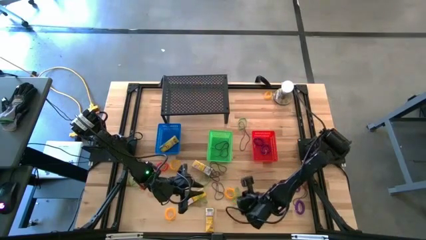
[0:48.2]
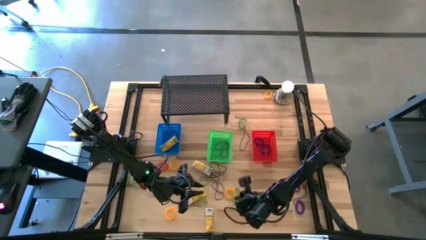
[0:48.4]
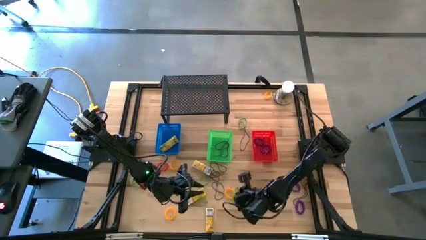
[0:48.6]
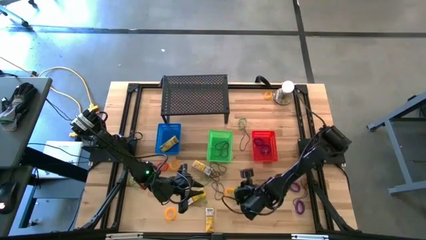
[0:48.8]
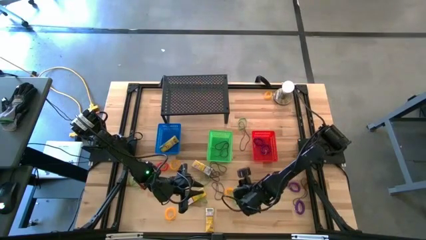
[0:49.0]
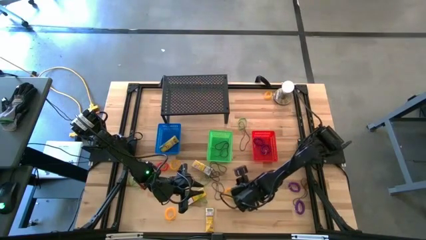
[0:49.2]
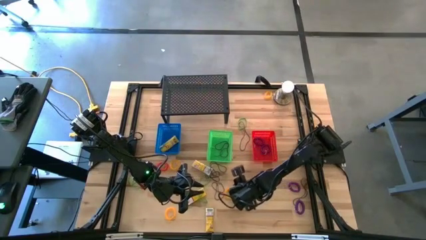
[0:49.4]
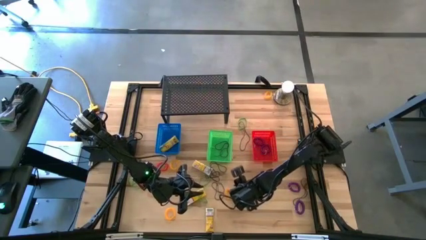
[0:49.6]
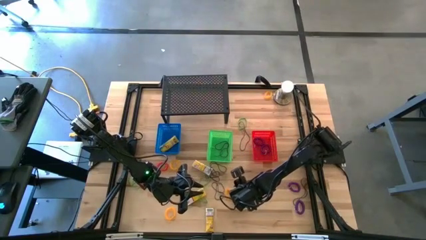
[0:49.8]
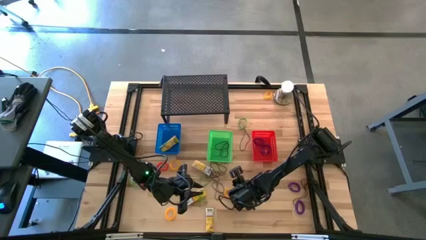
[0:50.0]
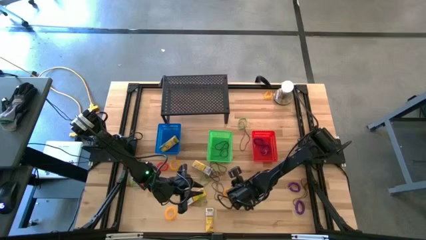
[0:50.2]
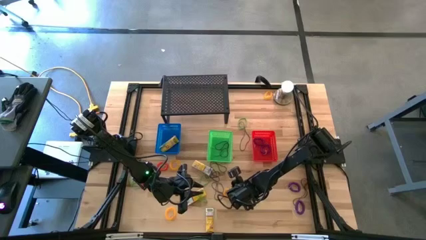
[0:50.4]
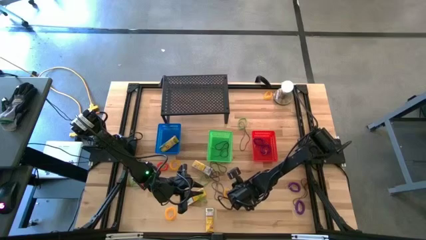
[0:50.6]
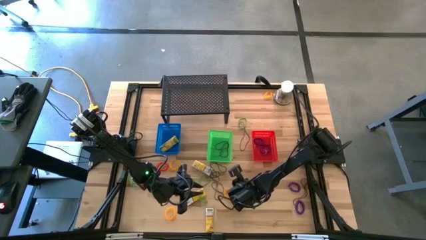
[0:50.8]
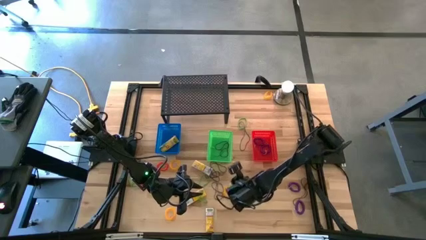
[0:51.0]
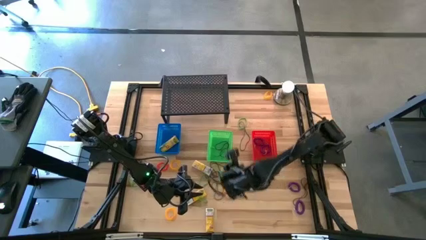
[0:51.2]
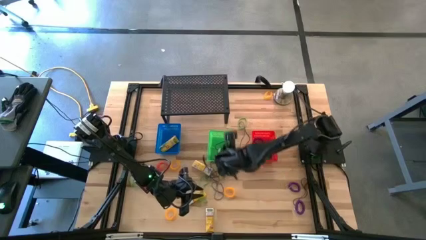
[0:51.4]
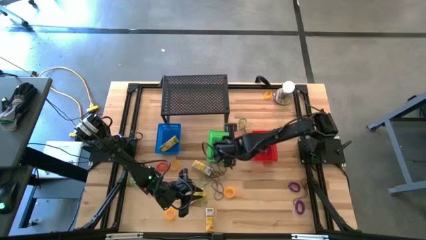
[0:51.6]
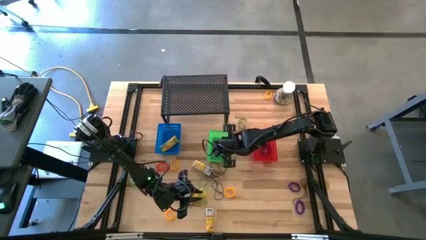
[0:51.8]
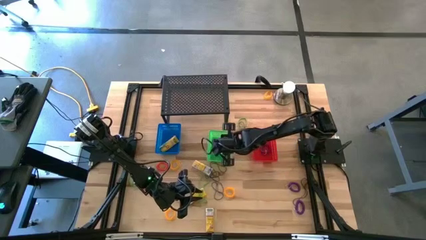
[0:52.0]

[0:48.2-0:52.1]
Task: Pick & Place Office Desk Supplies
Put the green rubber band into the green bin

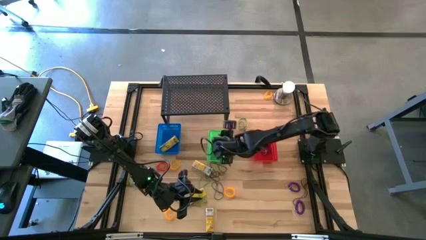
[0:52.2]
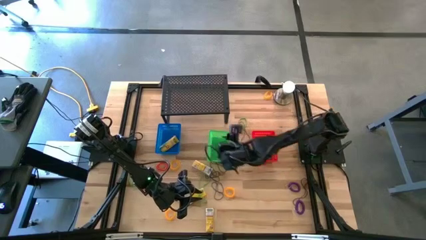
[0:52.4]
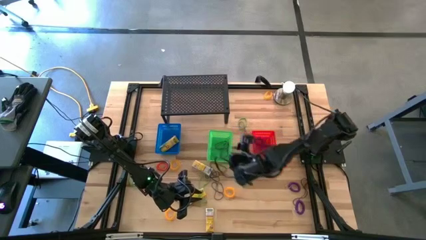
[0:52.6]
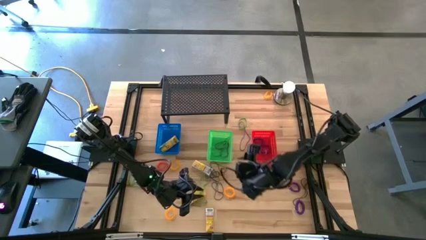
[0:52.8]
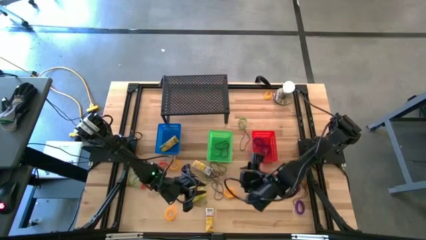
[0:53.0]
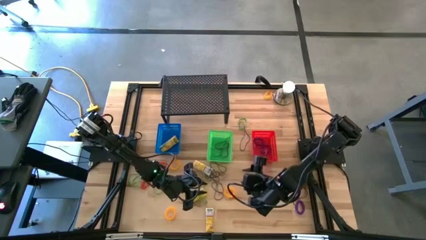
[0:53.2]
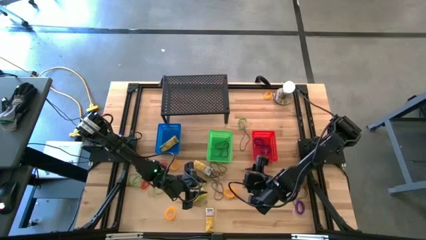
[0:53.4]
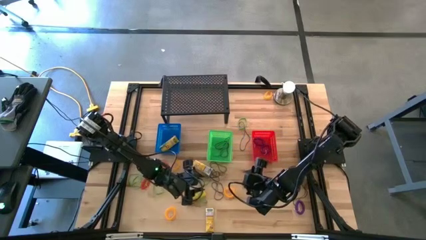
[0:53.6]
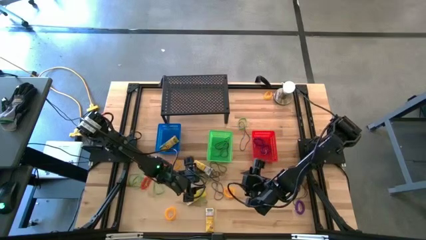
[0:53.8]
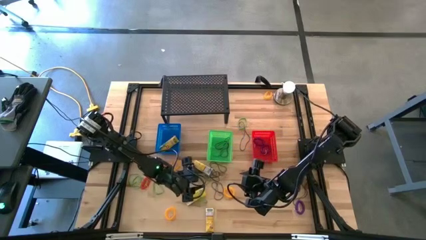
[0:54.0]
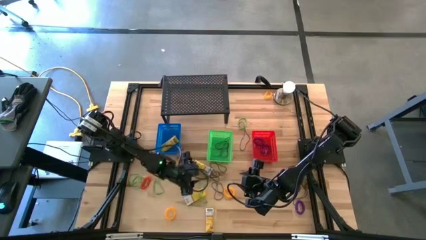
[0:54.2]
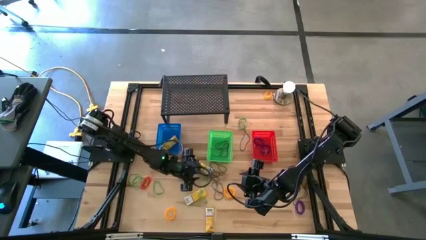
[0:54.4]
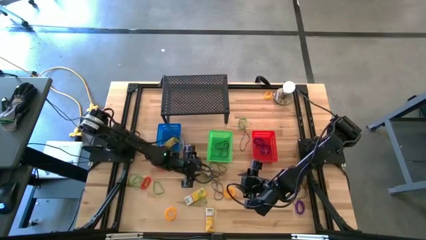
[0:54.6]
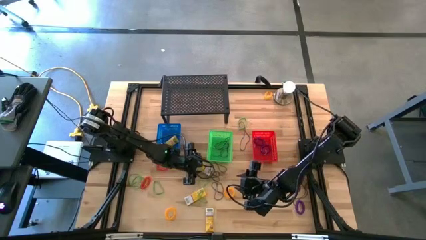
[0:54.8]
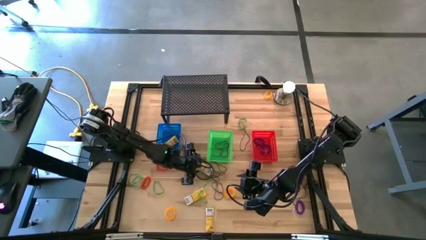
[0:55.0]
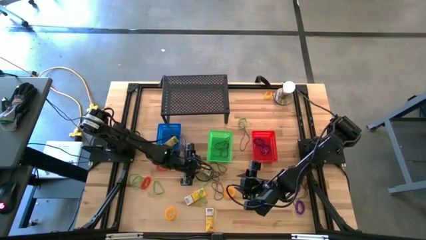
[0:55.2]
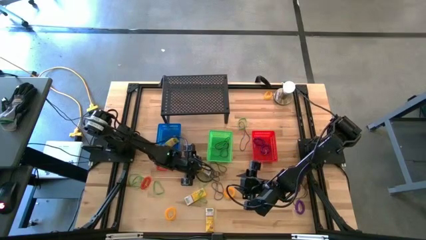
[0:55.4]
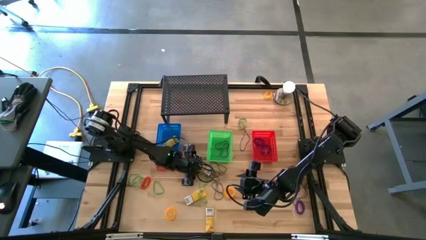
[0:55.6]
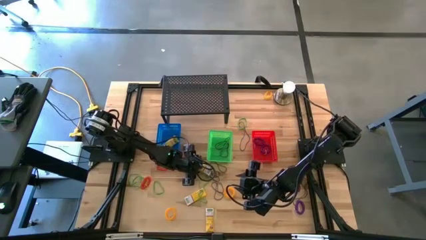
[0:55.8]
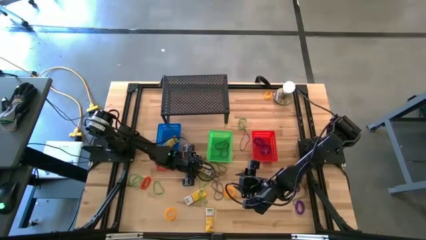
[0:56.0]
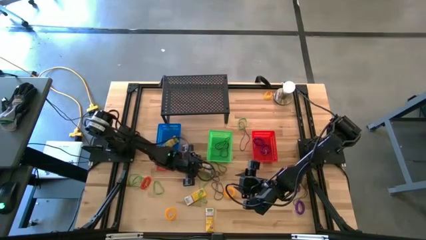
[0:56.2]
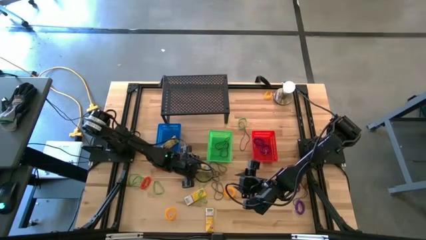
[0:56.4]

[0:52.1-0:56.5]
Put the crayon box into the blue bin

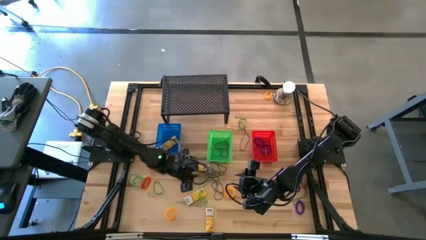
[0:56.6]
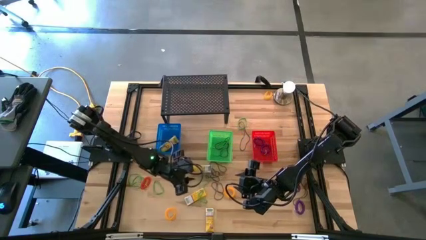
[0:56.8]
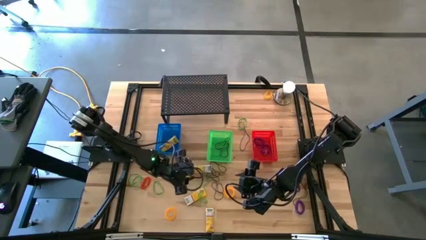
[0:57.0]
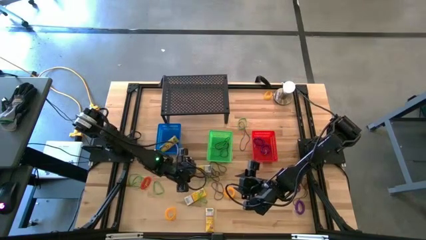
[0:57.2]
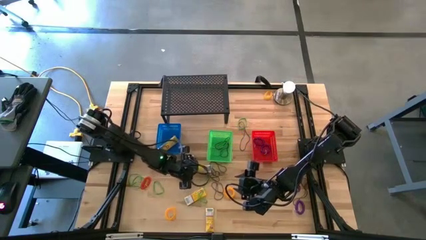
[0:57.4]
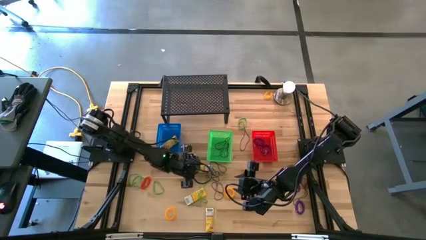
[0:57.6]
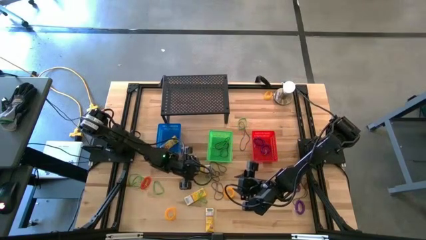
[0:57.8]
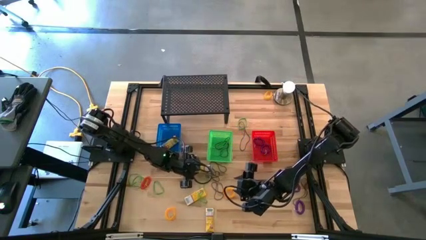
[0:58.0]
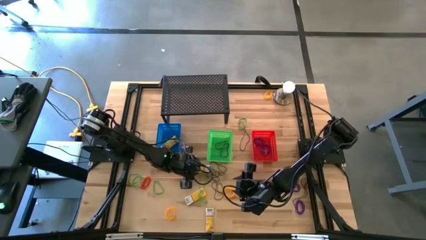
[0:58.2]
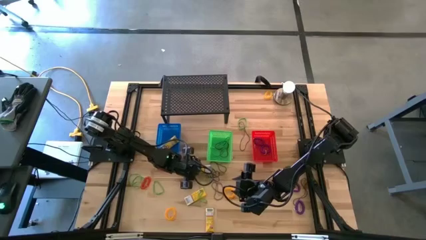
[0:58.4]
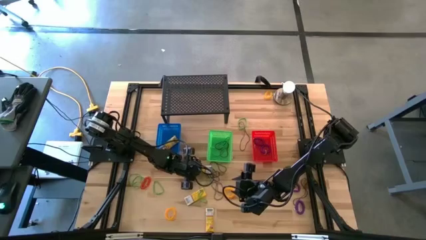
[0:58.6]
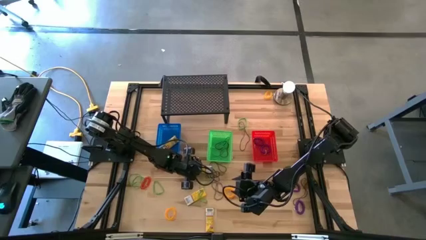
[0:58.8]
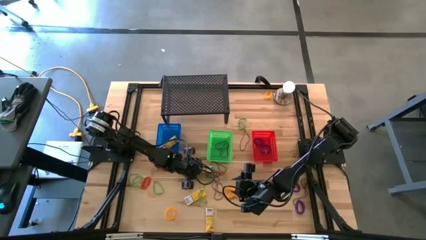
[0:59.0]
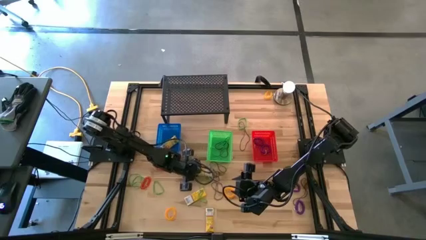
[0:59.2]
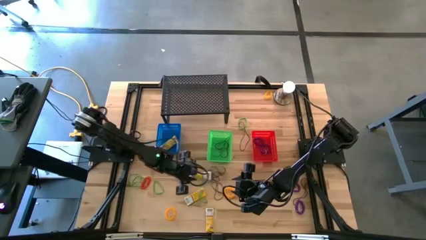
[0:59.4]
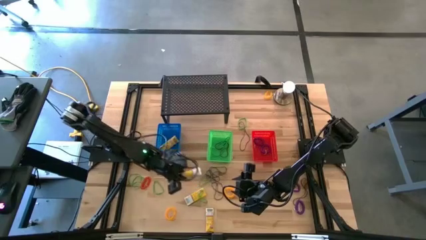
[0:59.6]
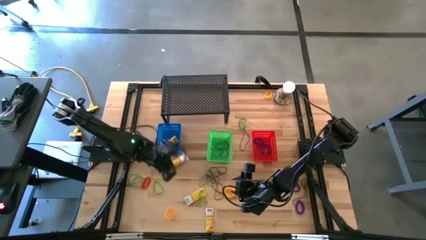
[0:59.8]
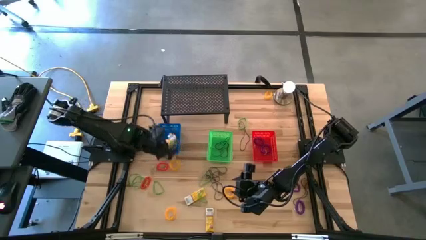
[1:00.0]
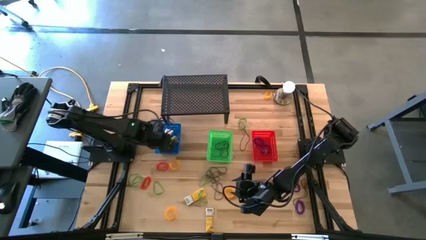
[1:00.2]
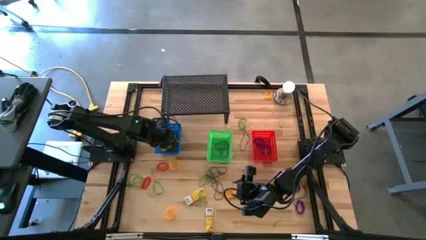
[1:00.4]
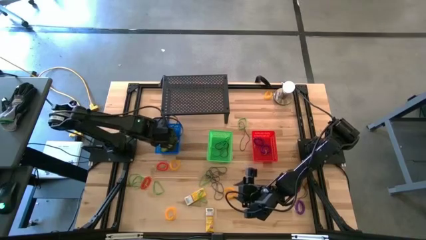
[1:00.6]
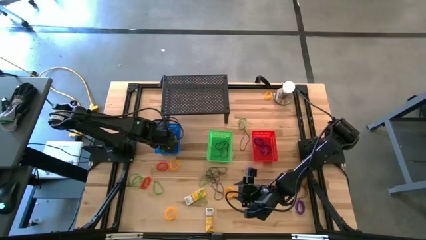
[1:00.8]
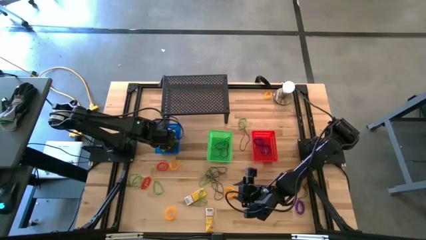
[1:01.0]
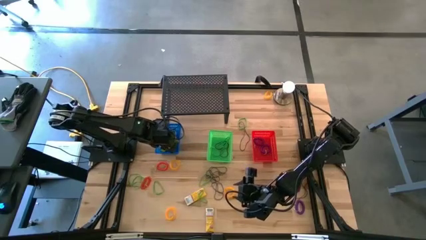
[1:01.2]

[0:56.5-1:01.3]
Put the crayon box into the blue bin

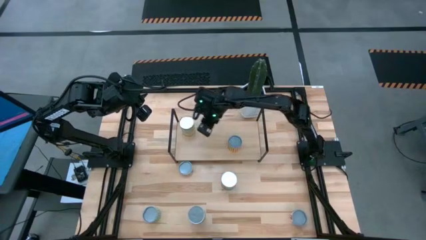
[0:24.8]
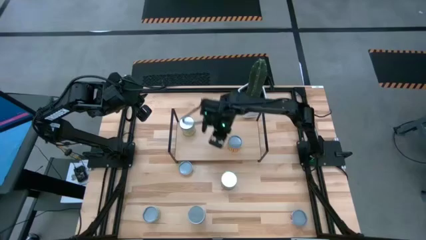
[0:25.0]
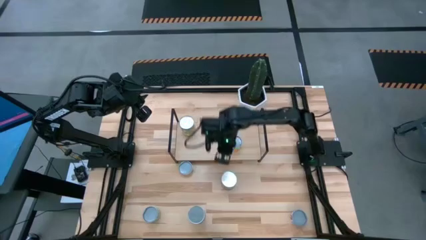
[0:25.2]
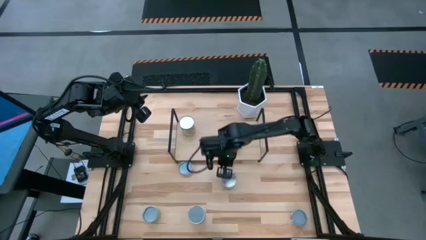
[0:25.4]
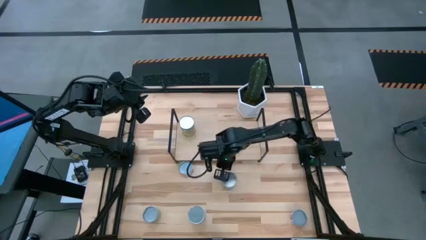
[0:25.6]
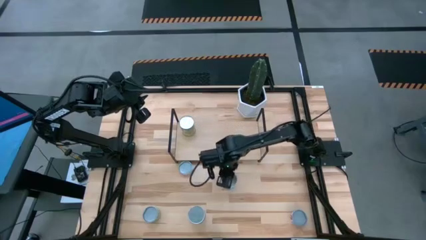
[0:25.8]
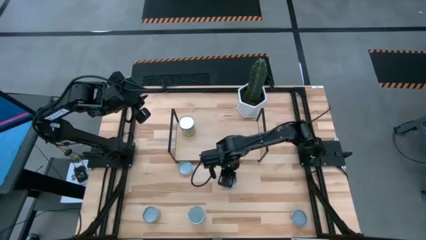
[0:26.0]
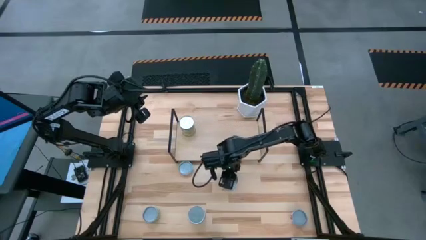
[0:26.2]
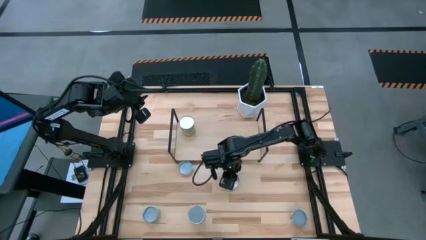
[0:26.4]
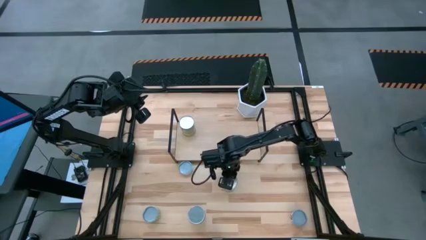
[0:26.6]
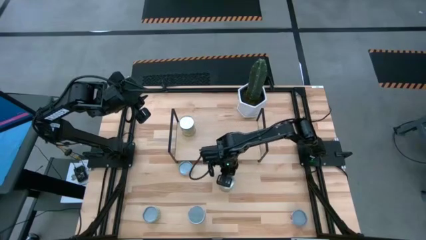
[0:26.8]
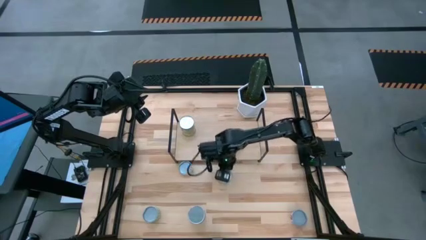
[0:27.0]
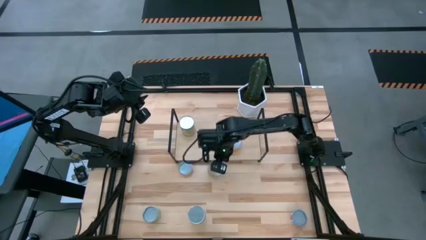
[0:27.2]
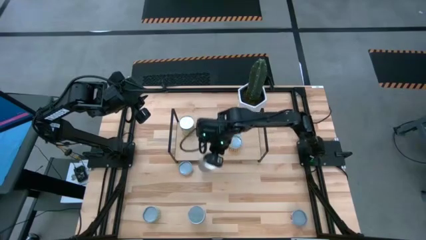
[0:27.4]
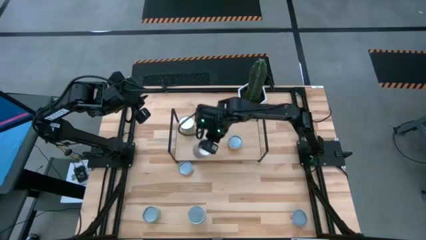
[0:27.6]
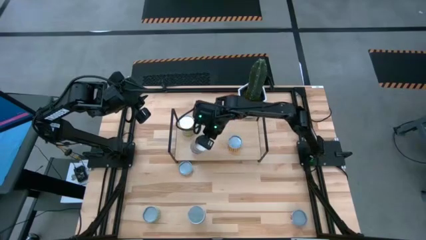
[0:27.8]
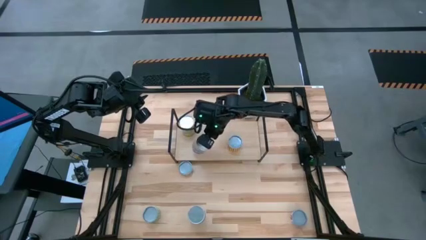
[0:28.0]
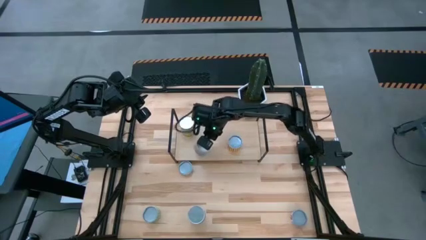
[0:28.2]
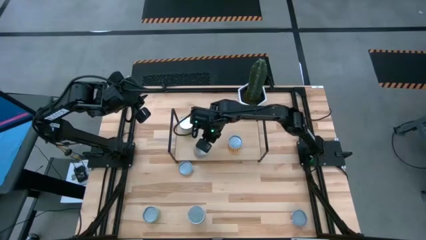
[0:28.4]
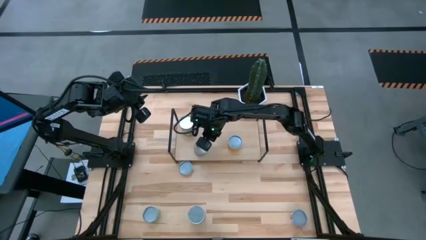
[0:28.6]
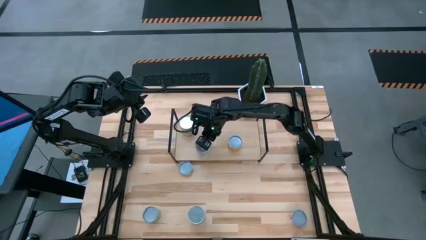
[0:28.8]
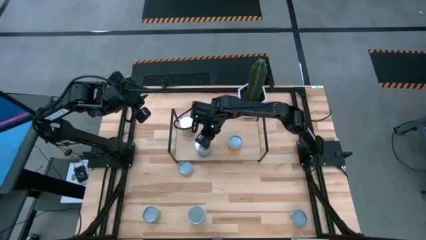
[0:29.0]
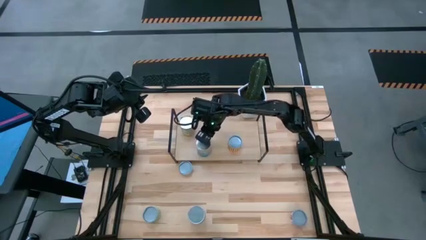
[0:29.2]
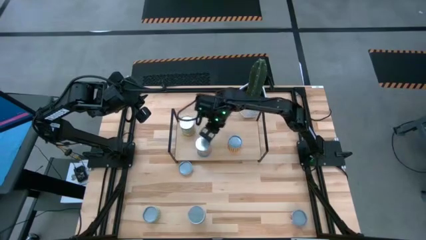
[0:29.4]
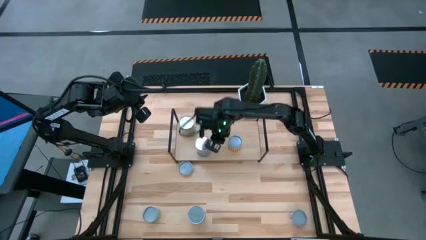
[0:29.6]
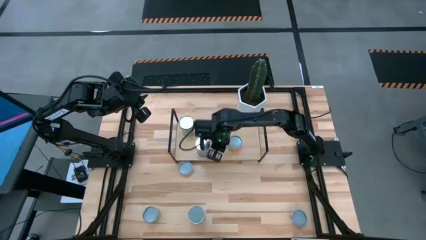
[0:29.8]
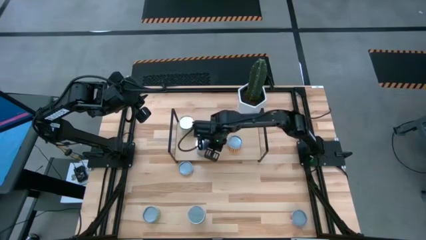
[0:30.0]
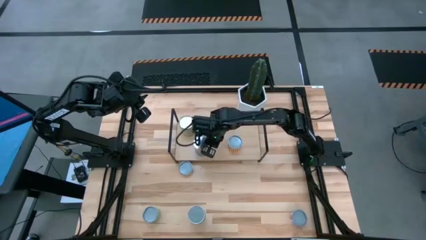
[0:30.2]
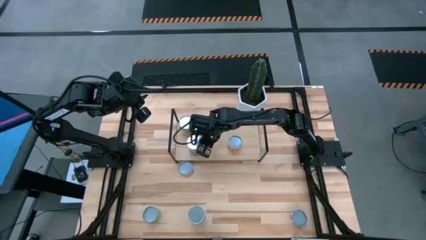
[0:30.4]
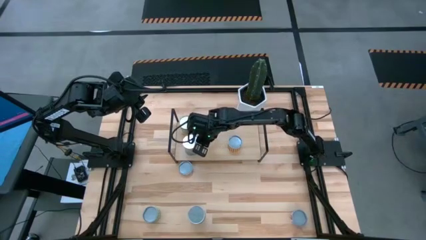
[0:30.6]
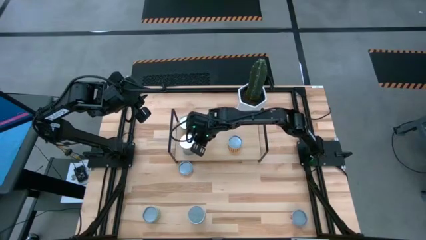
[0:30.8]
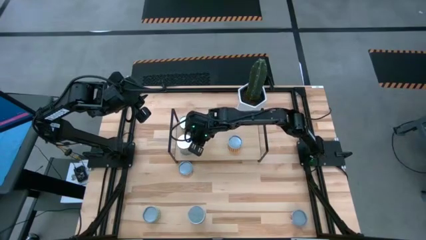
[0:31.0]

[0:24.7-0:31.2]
Task: Pick and place cans onto a shelf
Put the big canned tomatoes on the shelf aligned with the other big canned carrots
